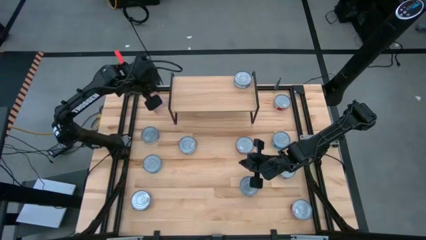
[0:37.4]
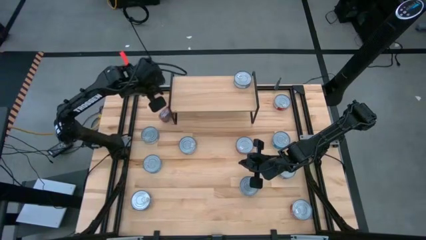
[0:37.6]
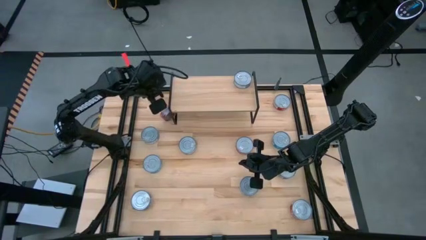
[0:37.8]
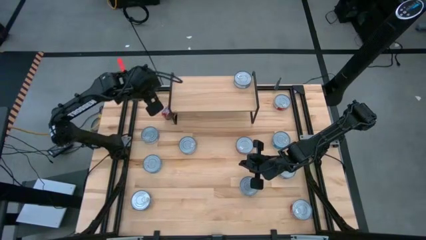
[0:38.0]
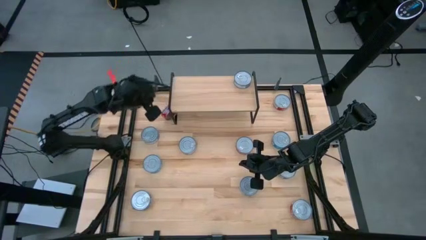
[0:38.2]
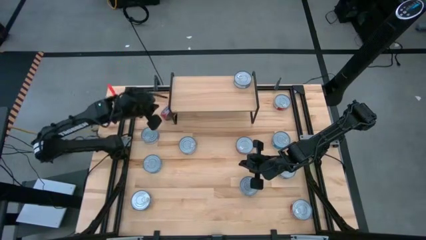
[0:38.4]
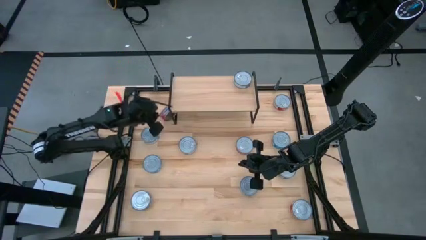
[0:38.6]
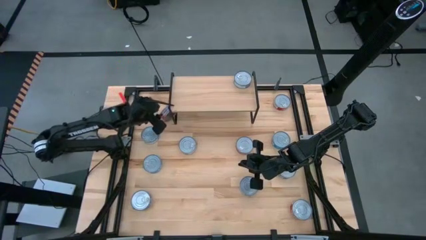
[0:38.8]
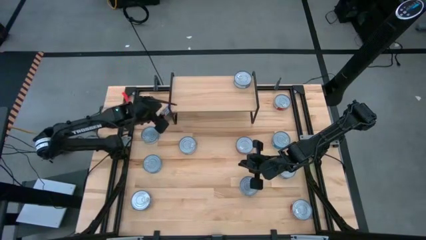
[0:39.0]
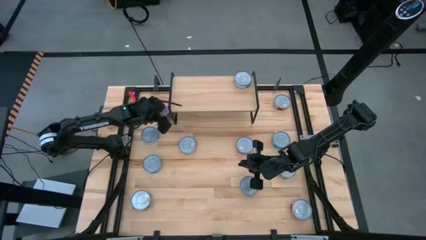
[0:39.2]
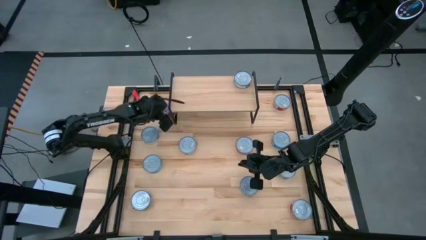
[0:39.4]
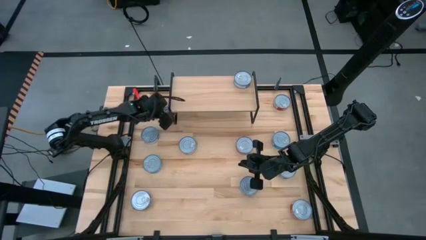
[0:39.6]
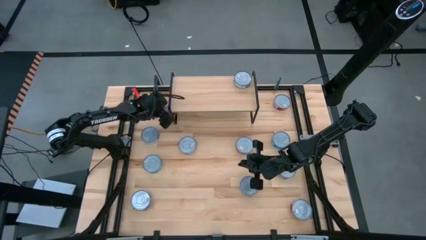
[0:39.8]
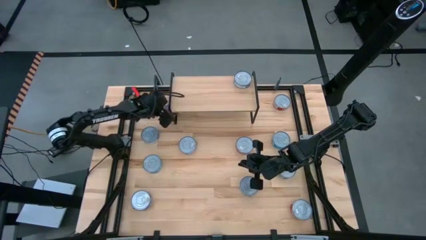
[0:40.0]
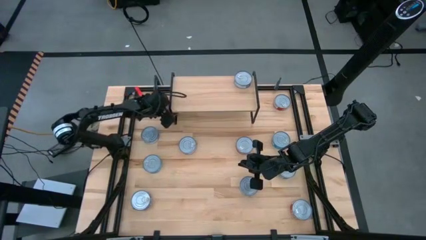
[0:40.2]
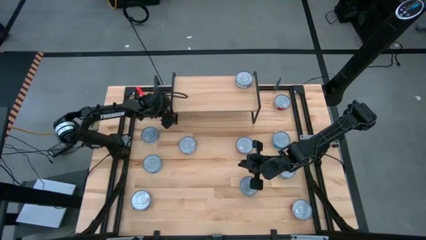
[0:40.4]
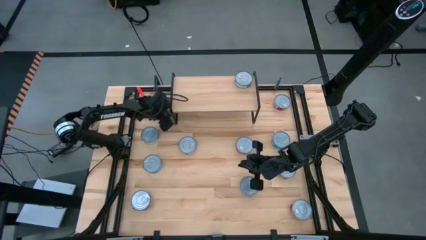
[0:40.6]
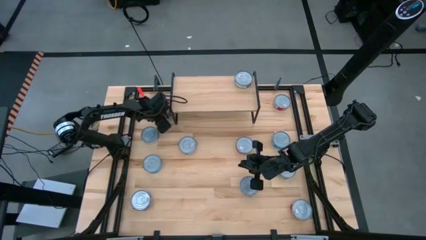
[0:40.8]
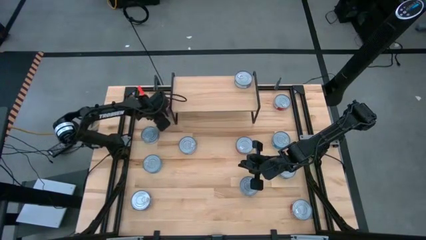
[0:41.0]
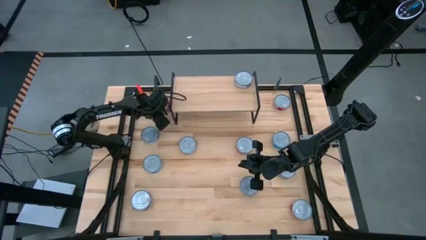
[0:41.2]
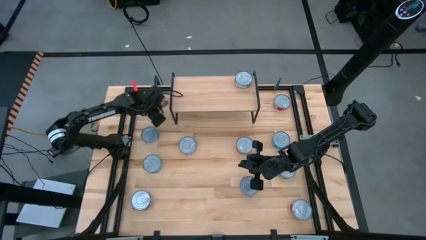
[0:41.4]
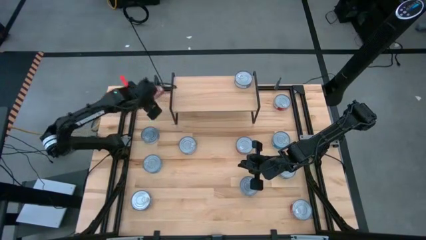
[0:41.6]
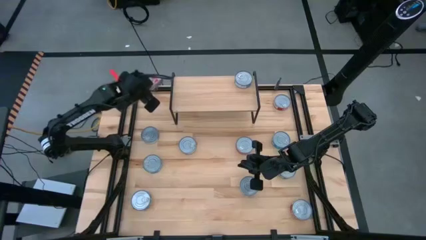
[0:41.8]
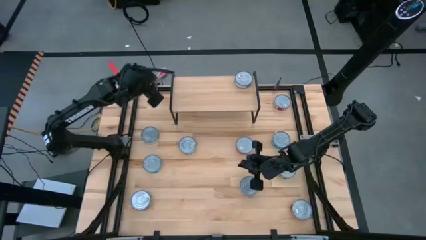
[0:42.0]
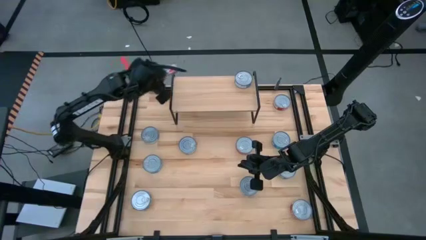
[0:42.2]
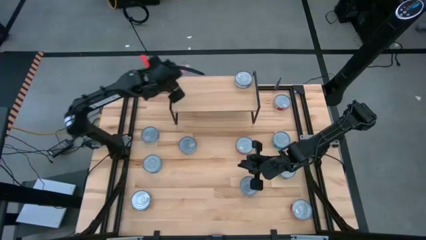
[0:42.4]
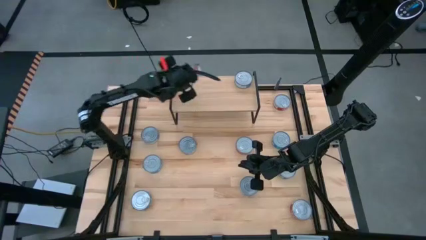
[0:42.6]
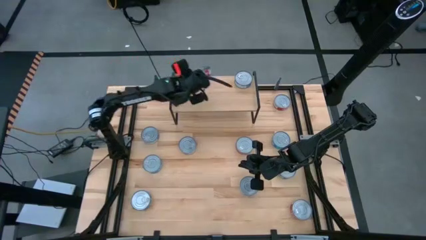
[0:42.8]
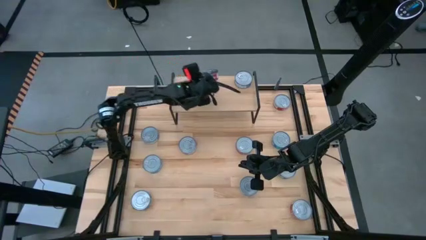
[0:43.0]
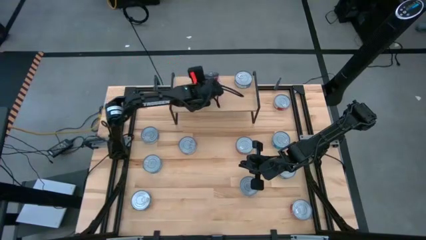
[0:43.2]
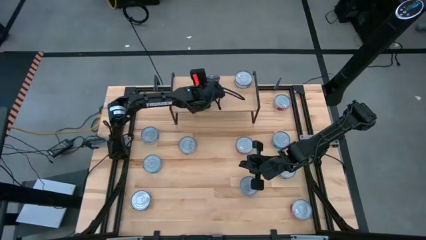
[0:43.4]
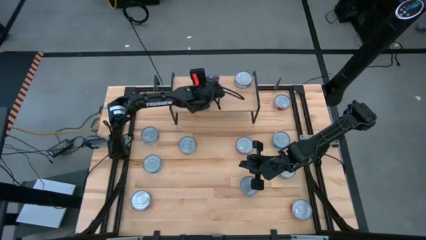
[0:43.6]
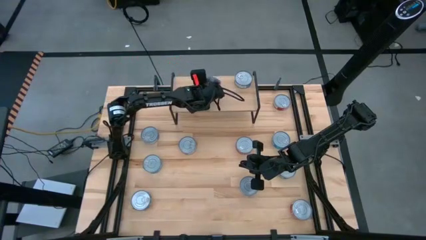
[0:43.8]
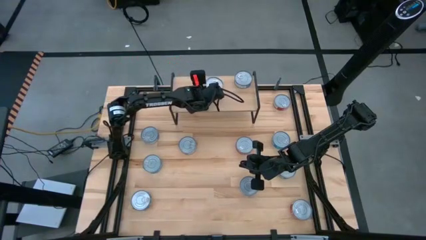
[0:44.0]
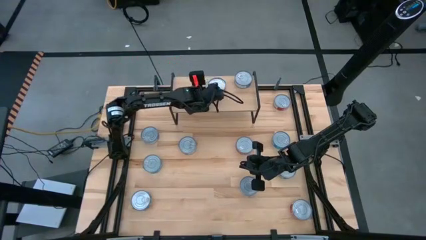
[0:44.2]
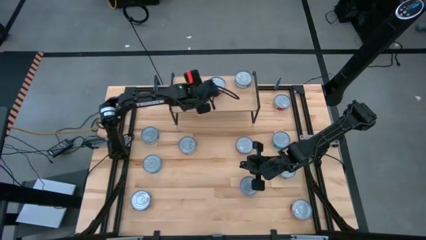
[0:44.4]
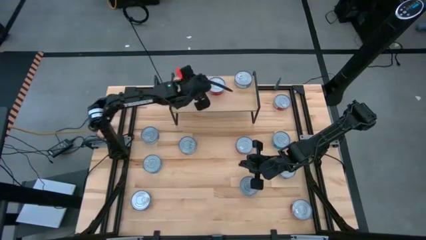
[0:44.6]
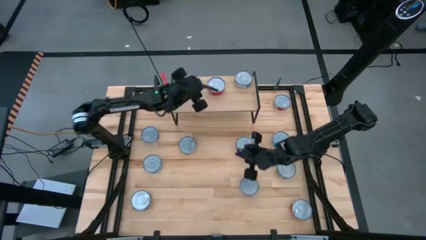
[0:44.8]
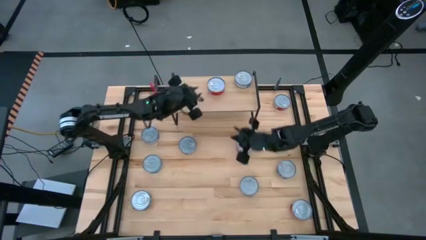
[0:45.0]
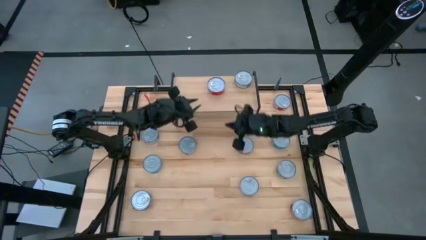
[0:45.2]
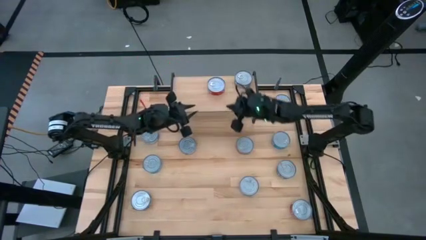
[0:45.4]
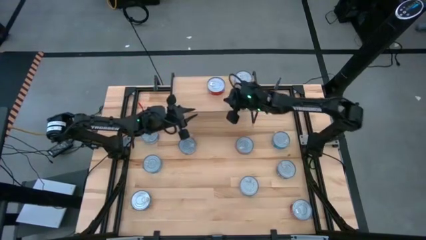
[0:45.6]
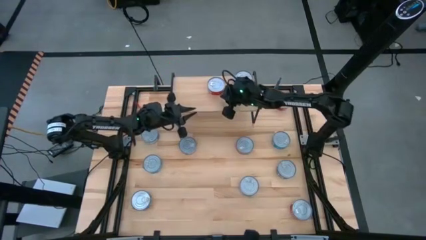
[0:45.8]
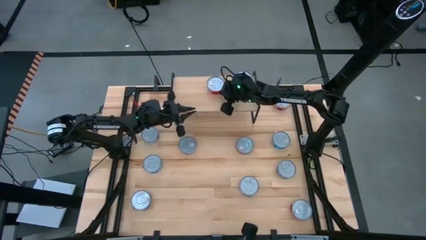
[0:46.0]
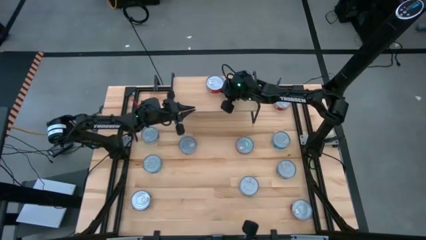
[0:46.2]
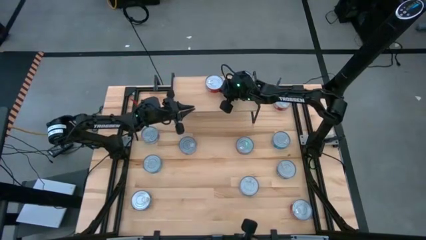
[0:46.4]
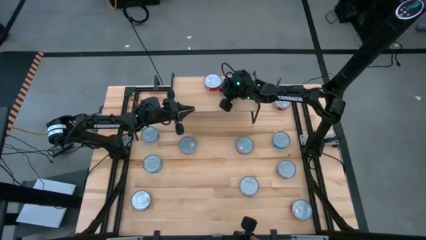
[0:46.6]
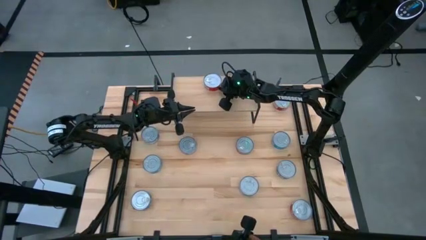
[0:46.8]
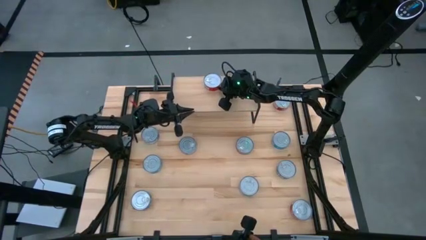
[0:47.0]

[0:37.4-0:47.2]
Task: Stack canned seafood by type on shelf
Put the red tuna can on the shelf

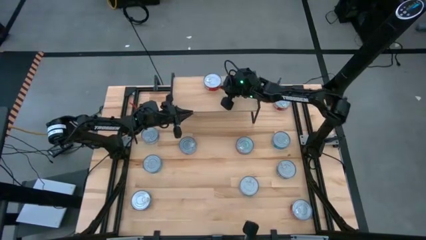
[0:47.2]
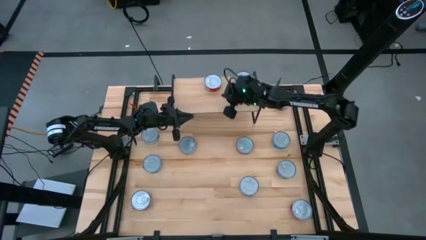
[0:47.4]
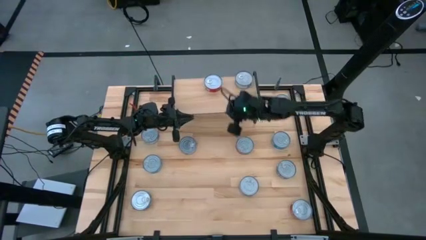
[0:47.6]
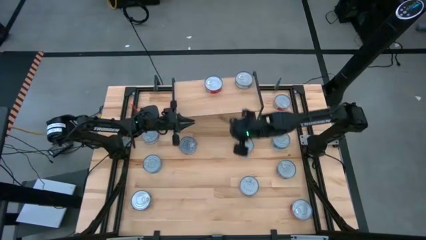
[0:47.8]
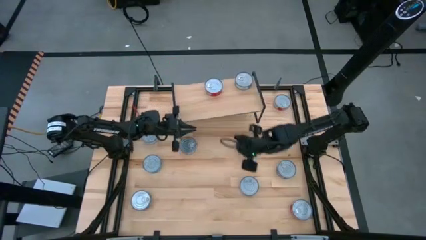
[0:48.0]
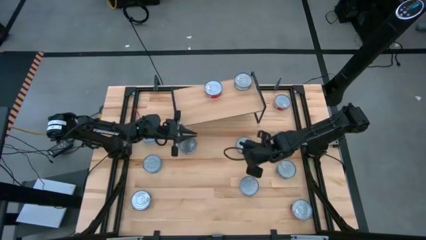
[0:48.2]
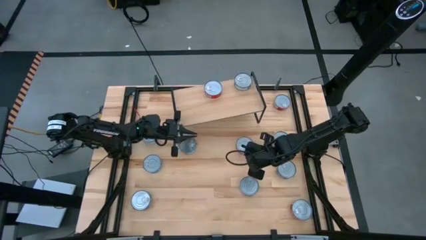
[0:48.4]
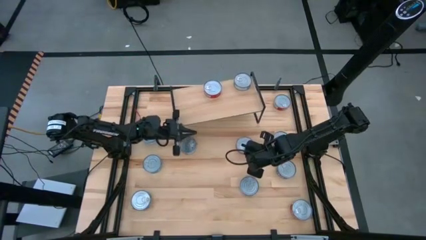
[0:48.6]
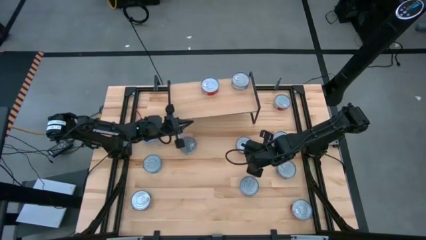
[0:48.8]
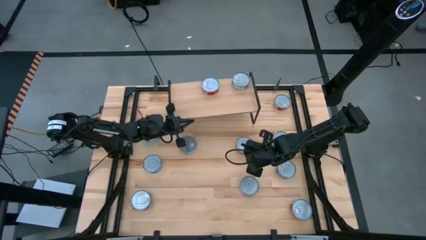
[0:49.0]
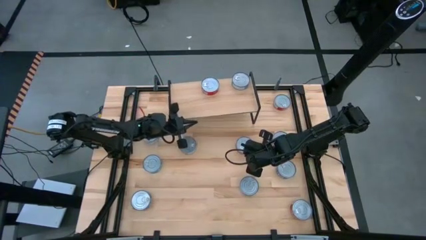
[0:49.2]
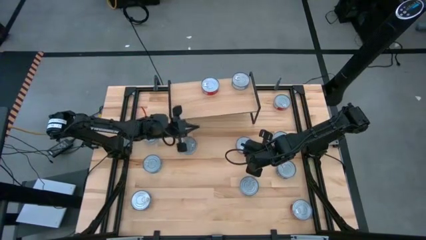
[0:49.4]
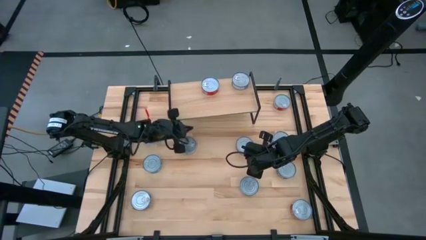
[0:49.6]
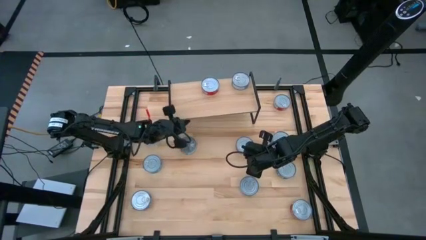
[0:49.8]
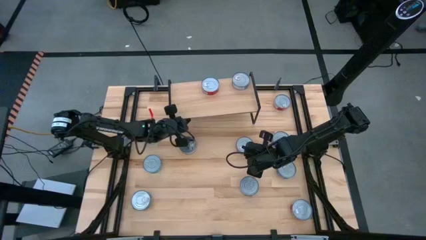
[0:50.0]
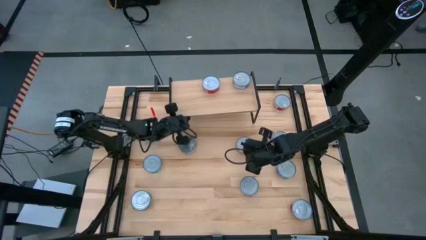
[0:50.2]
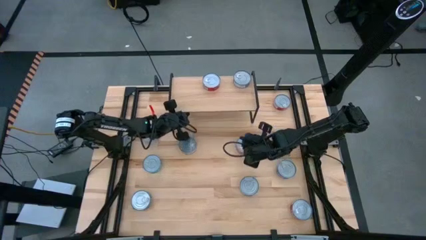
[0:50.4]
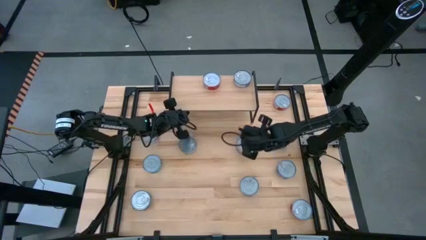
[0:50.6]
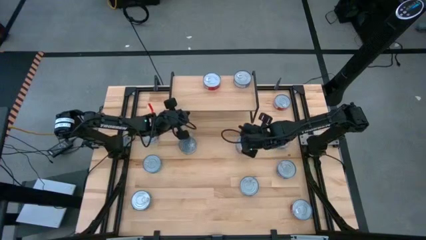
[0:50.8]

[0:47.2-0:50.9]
Adjust the shelf

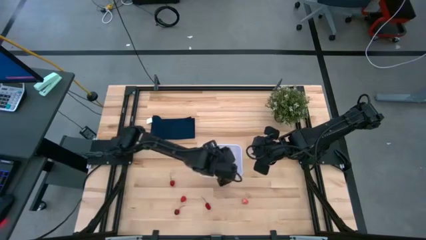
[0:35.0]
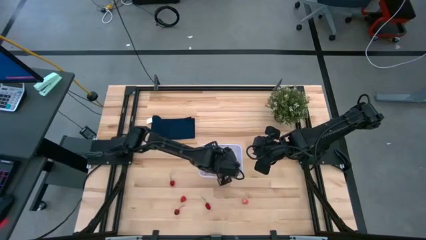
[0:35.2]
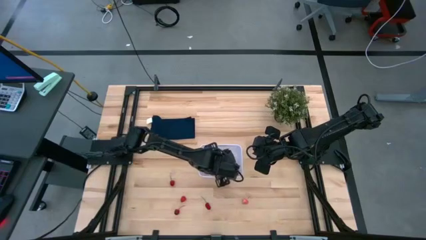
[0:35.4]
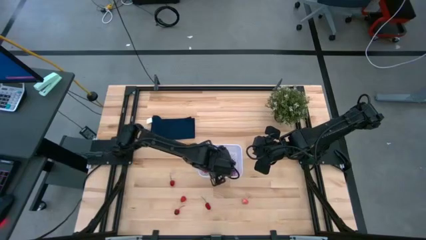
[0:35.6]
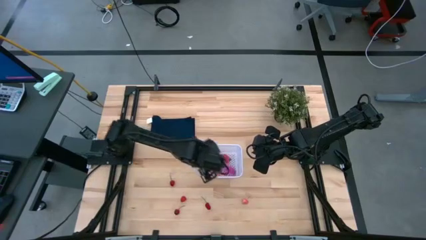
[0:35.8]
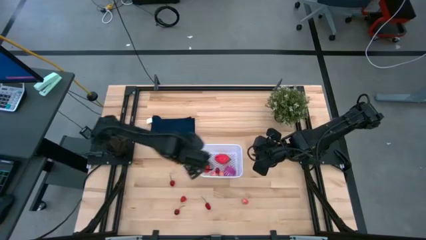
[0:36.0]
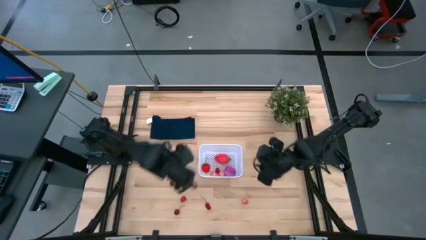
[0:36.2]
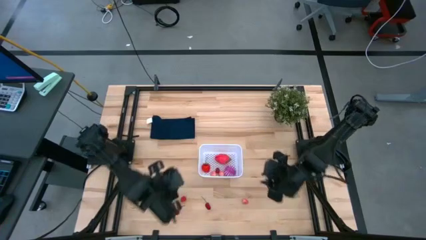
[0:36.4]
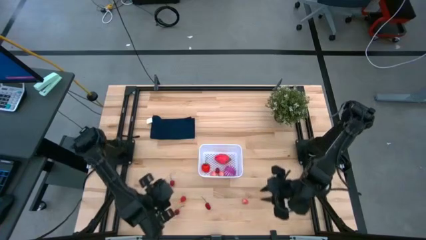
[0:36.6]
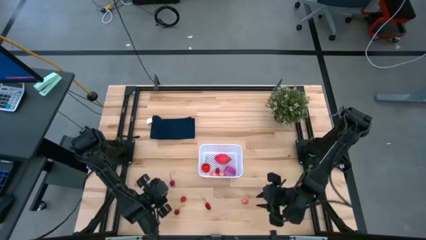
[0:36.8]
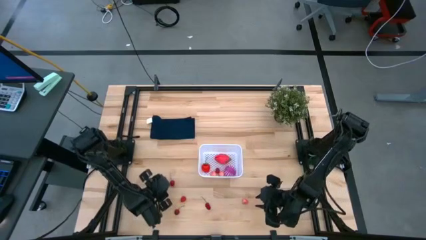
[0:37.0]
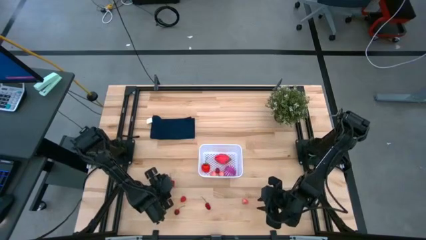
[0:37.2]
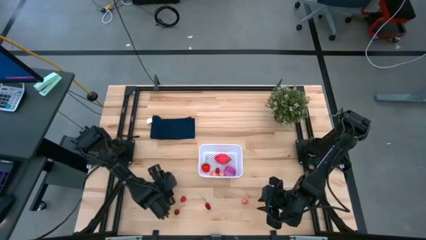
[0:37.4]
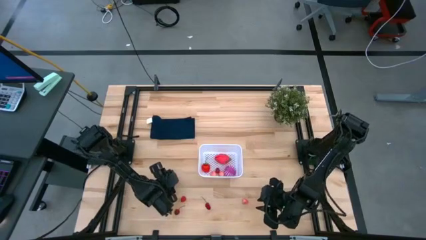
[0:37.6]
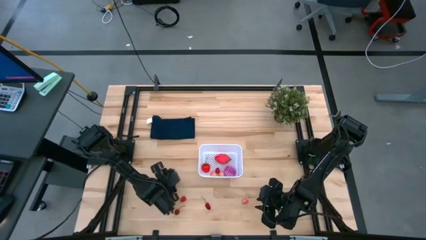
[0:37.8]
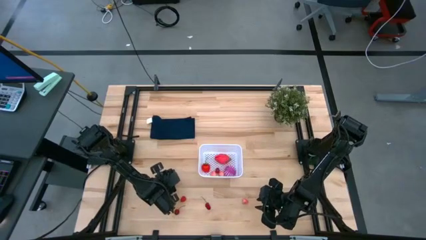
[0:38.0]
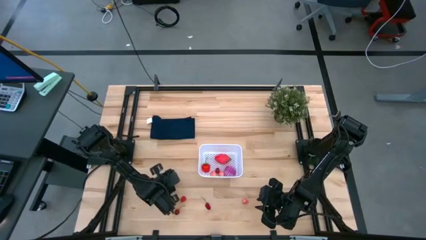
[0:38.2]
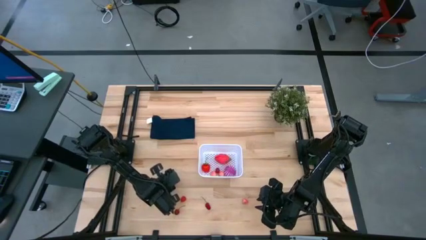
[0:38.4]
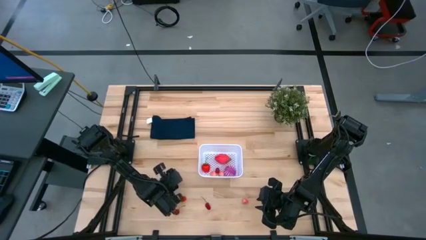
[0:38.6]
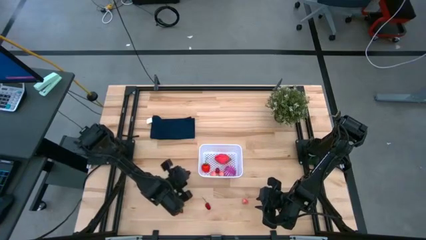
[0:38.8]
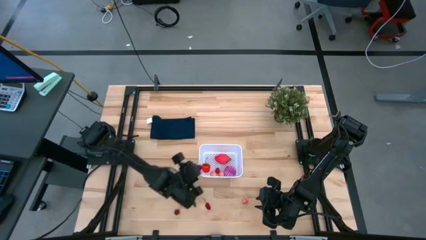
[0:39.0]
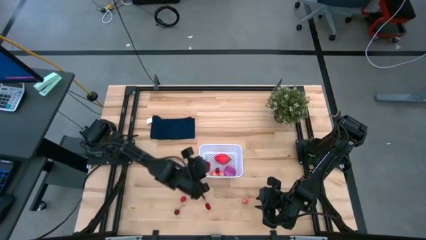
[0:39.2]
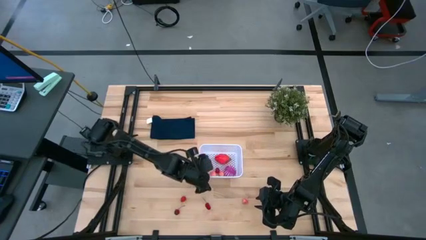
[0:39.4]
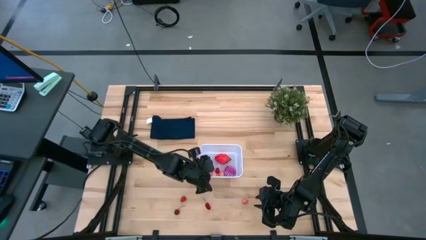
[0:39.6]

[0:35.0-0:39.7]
Task: Pick and placing Produce into tupperware
Put the cherry into the white bin
